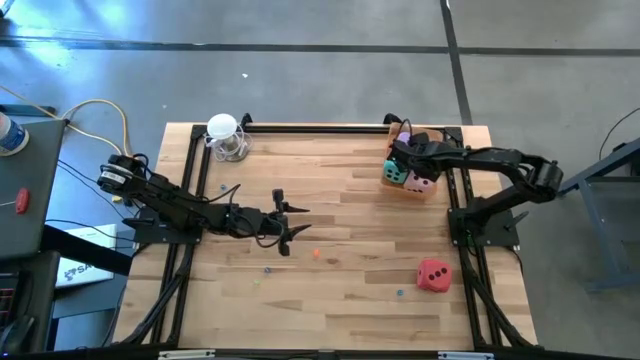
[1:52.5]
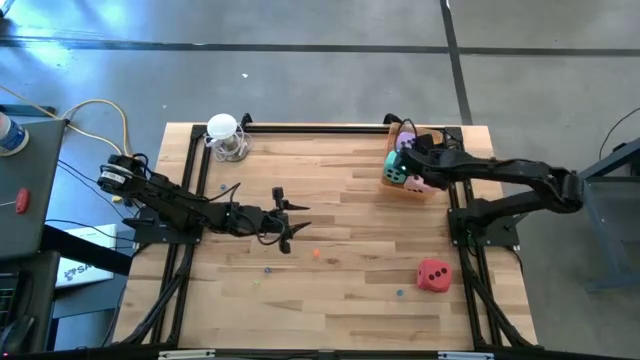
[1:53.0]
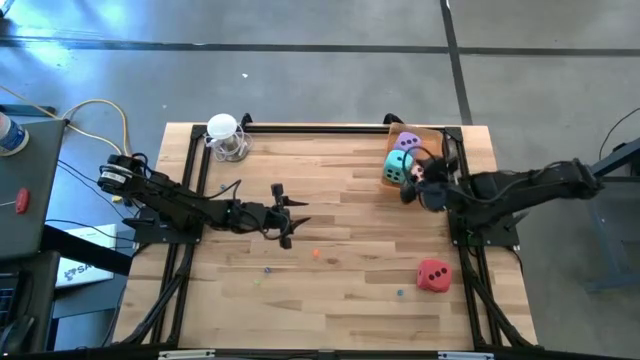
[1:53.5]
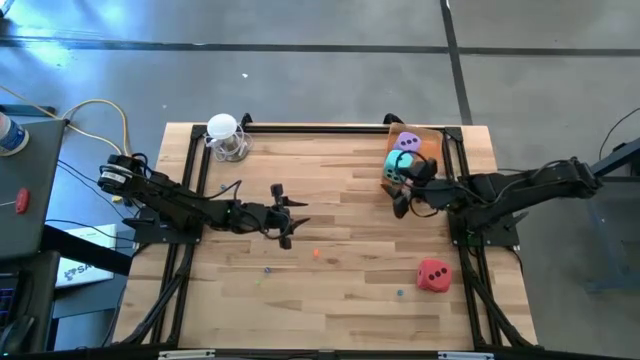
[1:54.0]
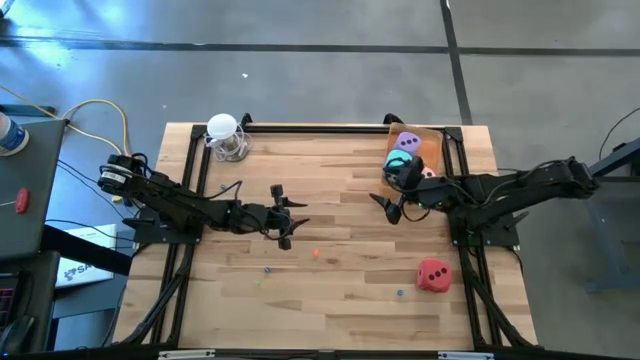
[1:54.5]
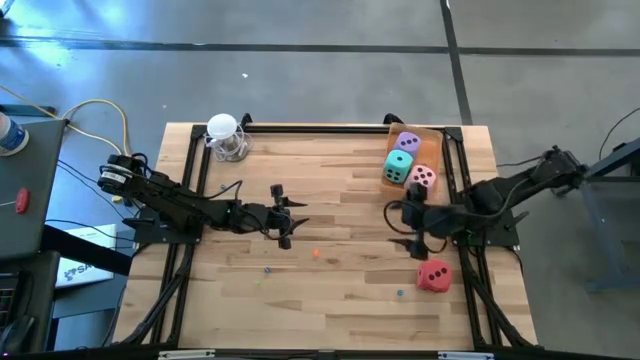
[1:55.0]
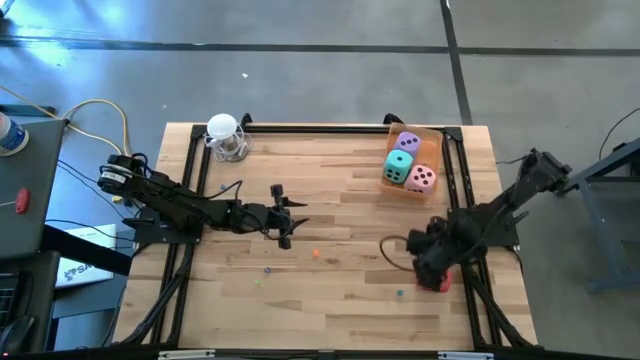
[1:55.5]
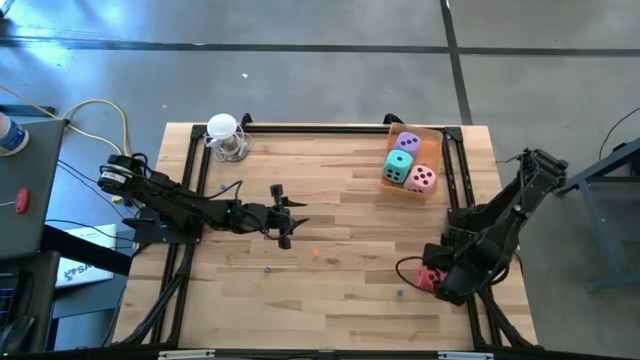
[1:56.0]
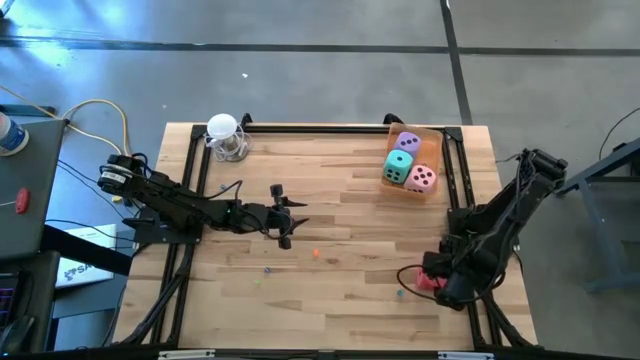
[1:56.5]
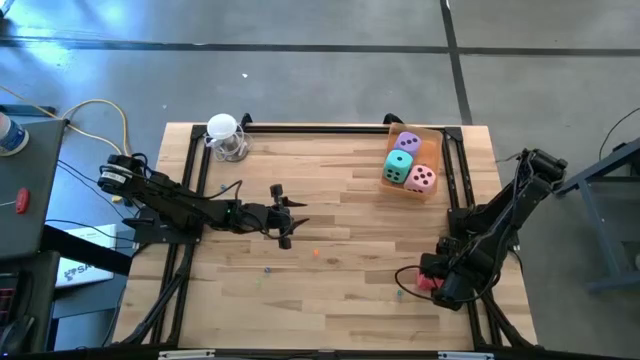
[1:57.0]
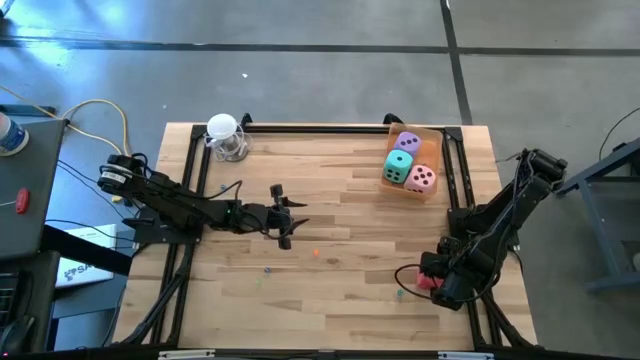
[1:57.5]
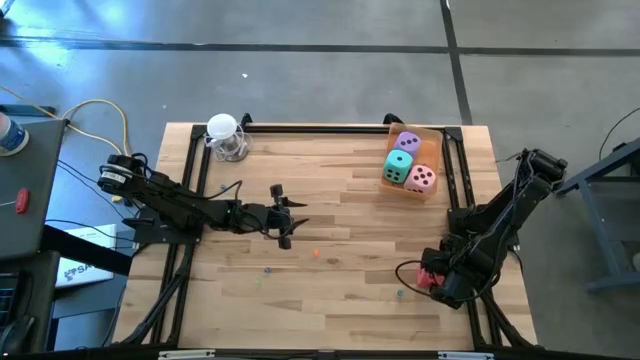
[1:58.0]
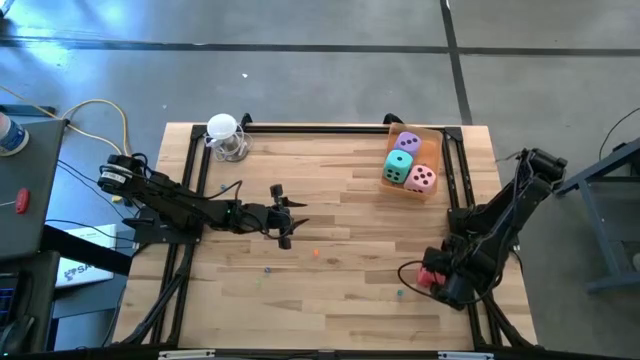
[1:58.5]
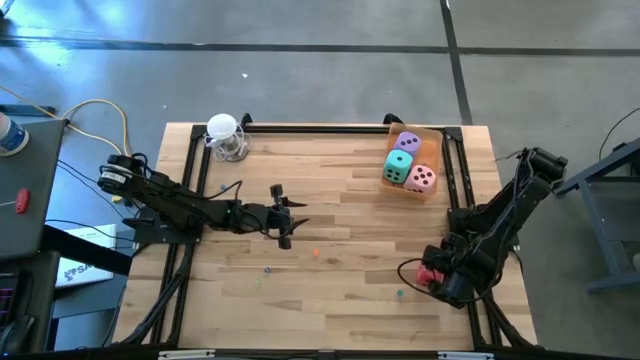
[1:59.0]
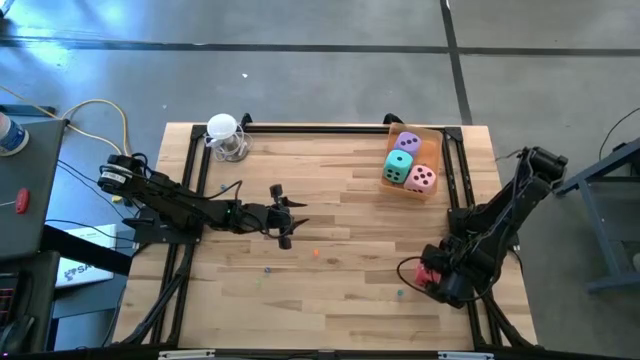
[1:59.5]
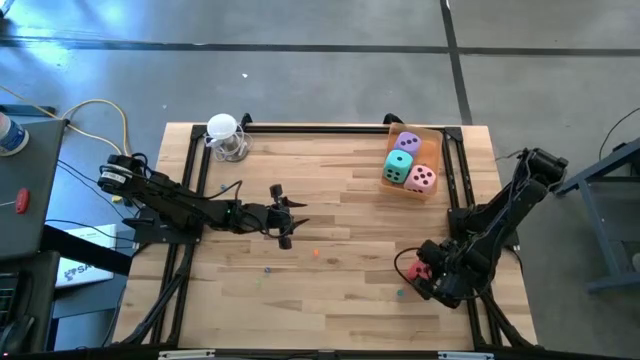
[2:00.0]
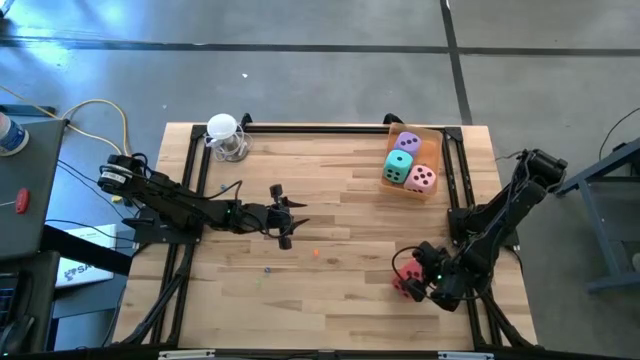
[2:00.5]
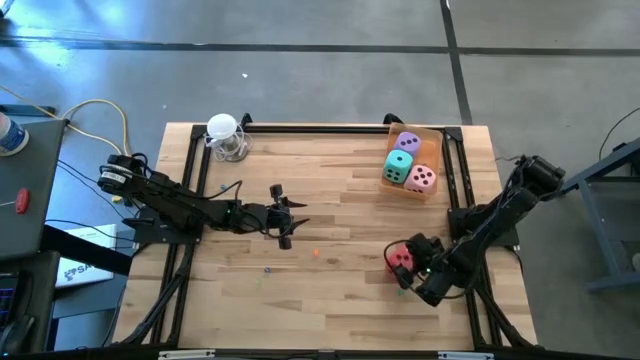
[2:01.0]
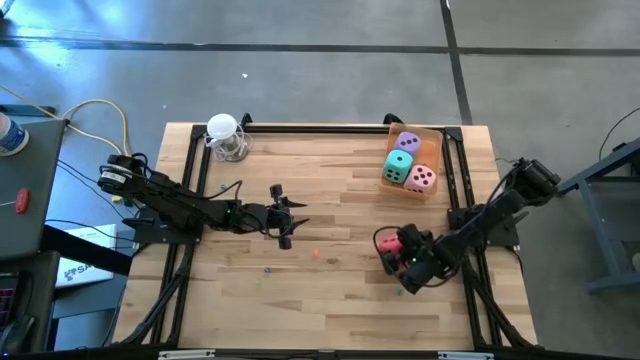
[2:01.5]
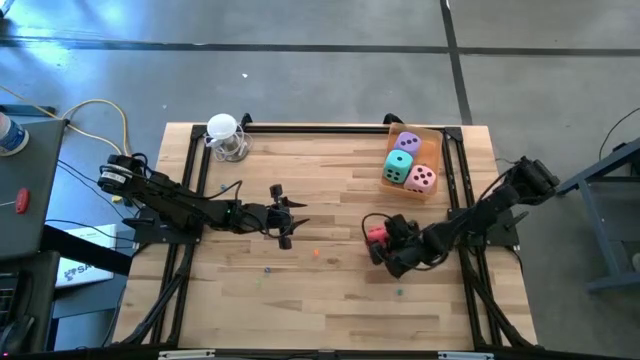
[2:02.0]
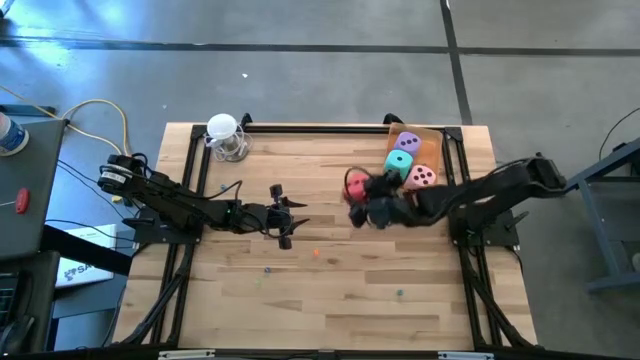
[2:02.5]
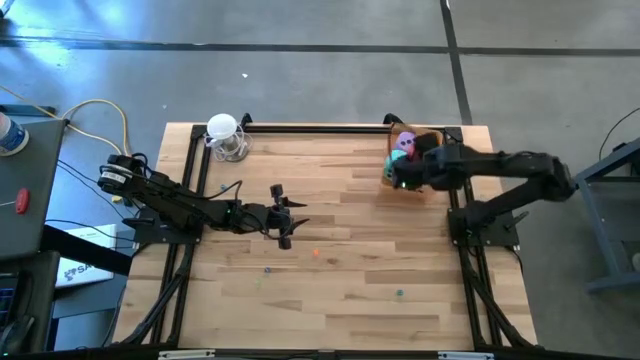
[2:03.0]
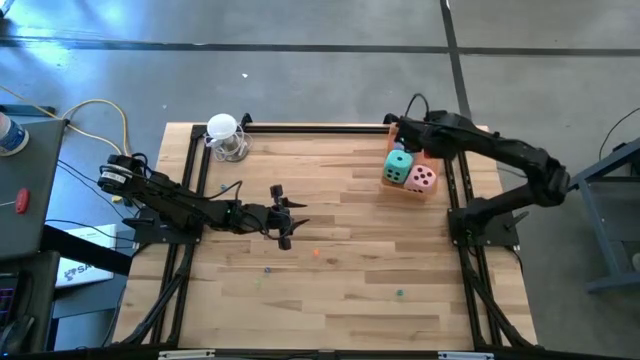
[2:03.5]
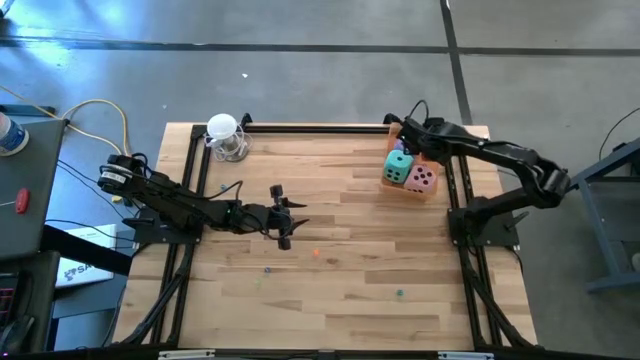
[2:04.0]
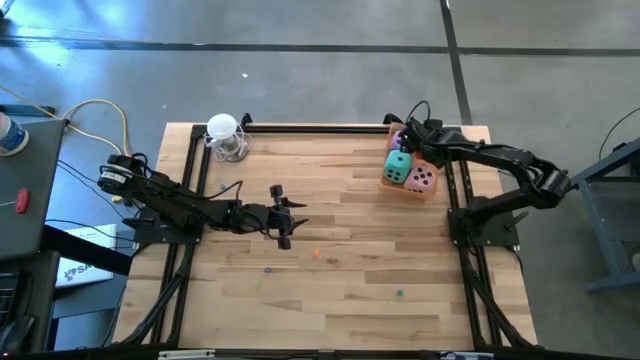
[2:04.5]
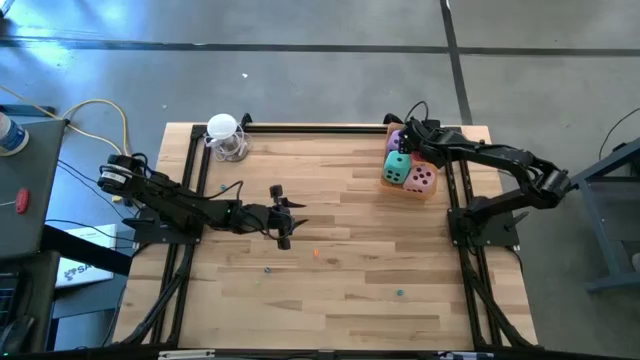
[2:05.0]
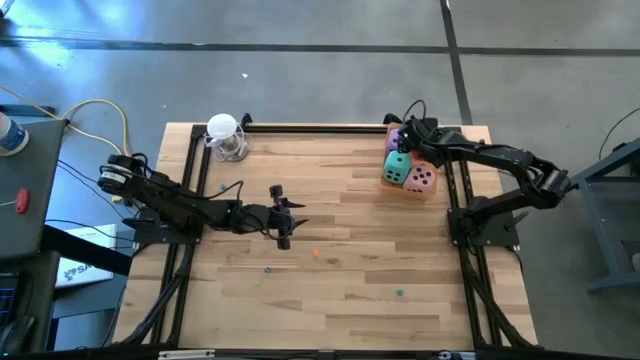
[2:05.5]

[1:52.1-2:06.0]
Task: Pick & Place Dice
Put the red large die into the orange bin

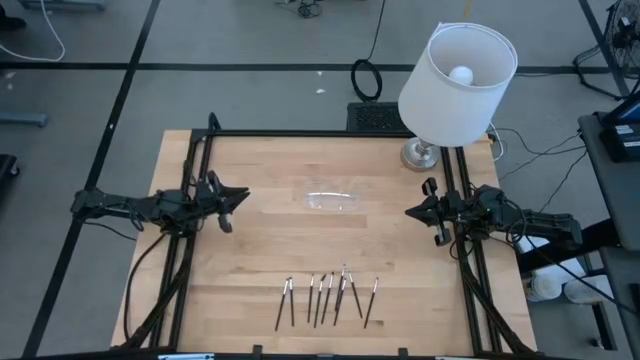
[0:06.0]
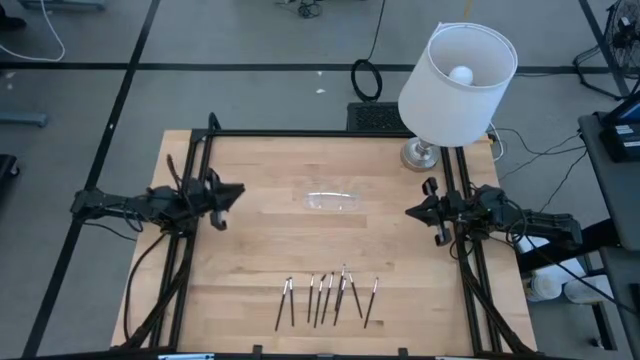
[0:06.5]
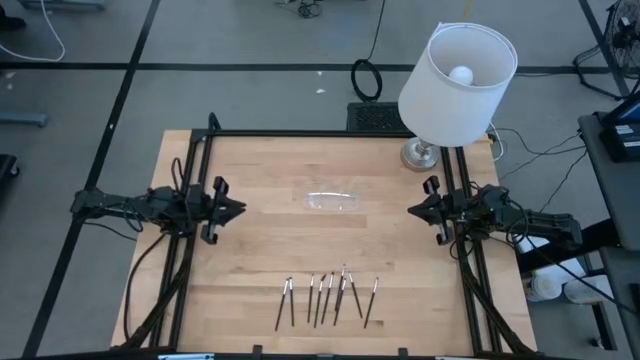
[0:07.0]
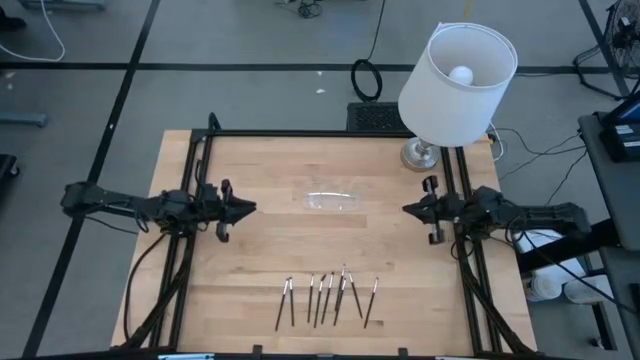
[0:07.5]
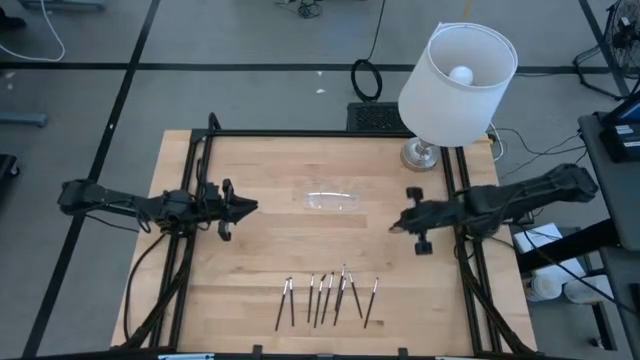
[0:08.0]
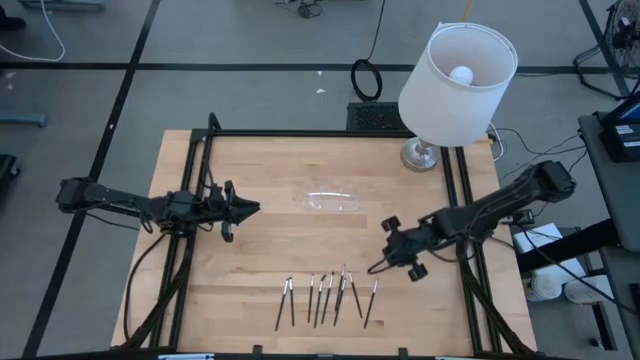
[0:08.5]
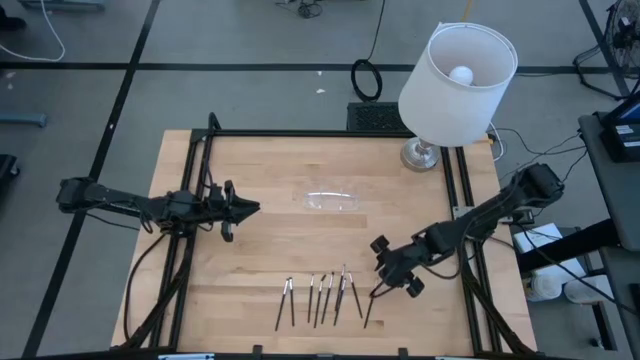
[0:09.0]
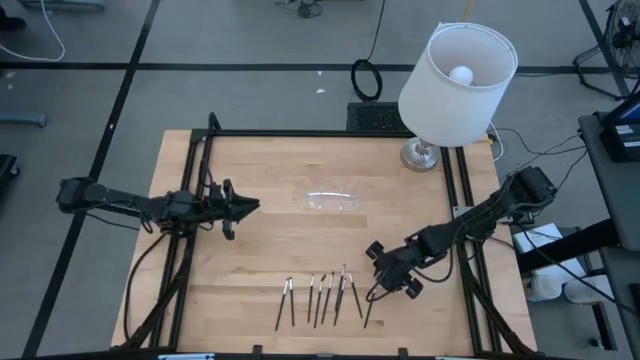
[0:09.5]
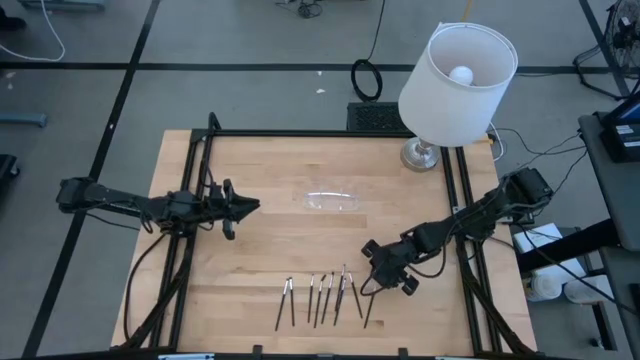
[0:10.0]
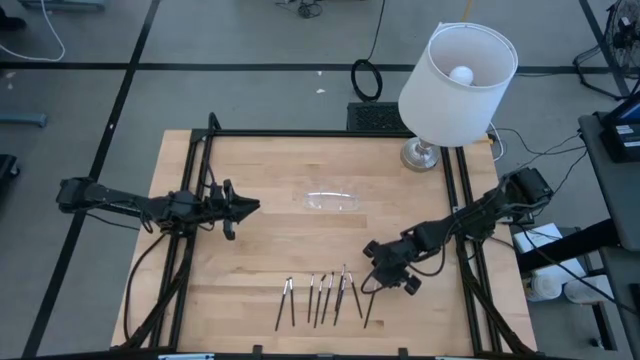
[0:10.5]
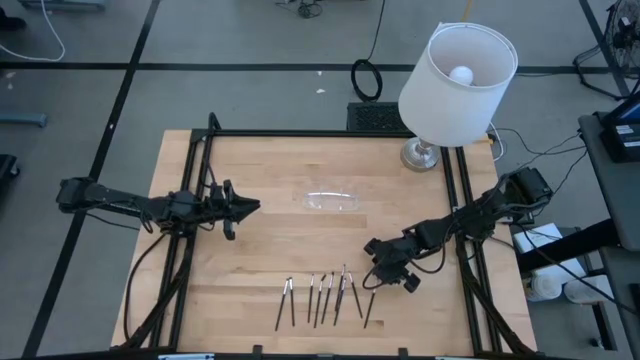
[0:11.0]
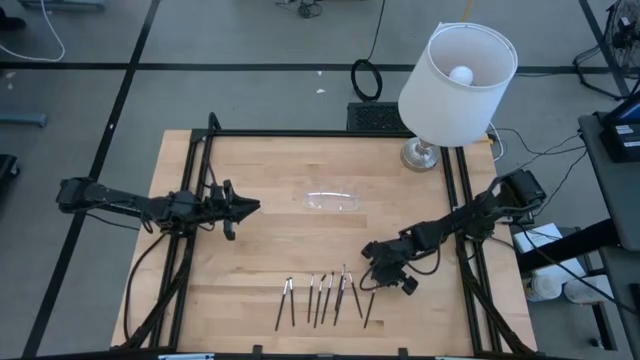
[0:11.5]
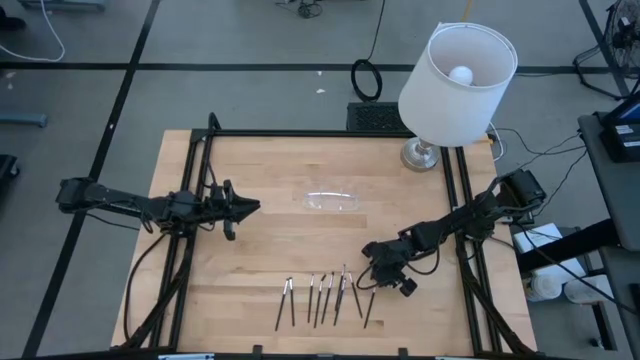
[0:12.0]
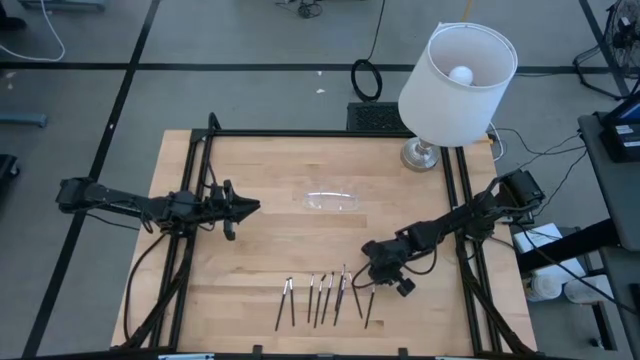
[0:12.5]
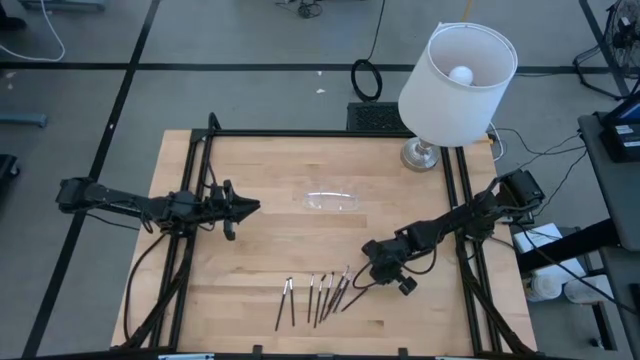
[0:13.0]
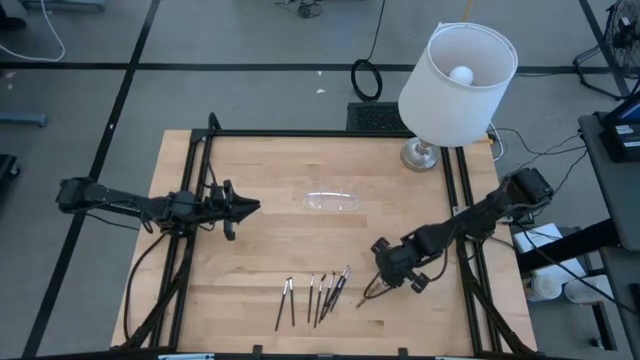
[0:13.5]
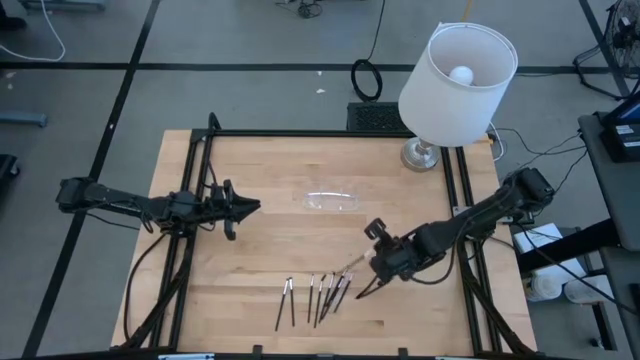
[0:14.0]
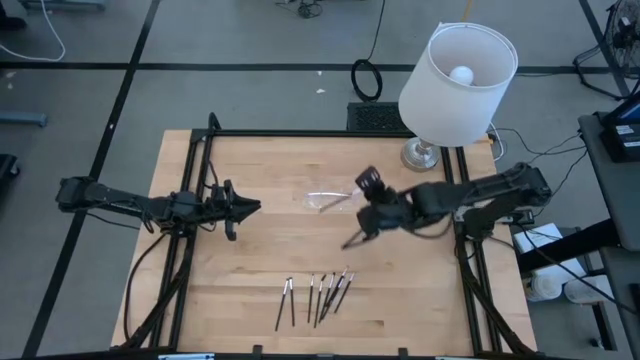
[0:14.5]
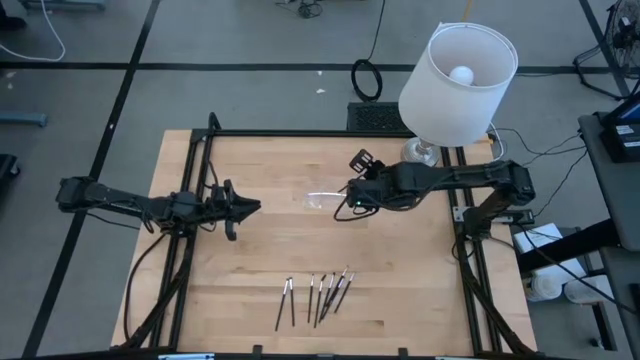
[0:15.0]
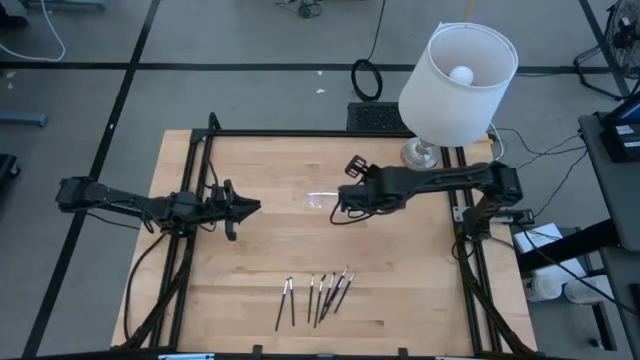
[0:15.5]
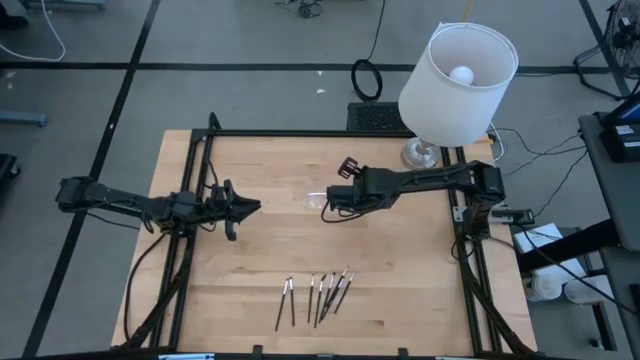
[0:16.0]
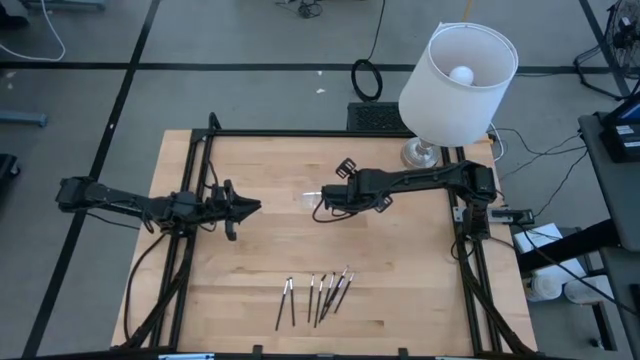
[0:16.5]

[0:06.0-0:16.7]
Task: Put items in baskets/containers
Put the black eyeshadow brush into the transparent organizer
